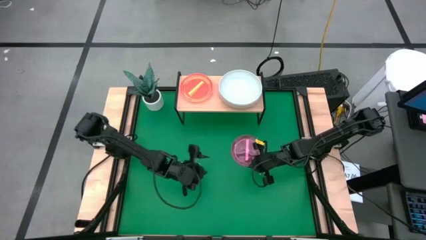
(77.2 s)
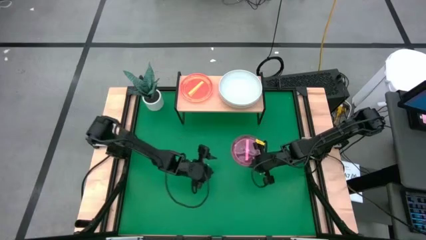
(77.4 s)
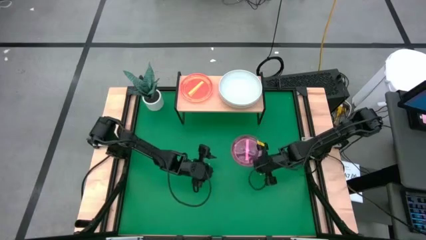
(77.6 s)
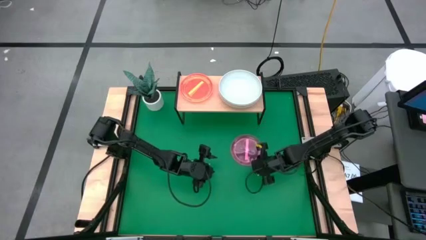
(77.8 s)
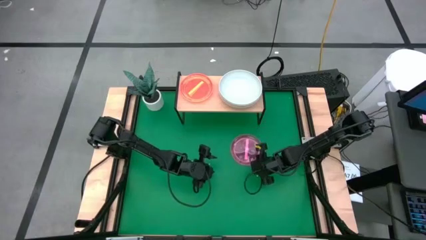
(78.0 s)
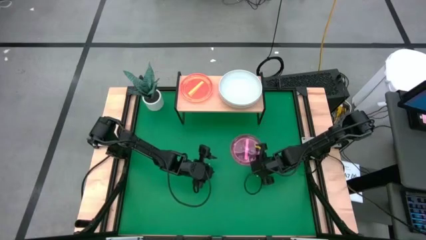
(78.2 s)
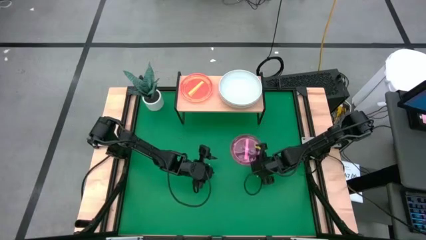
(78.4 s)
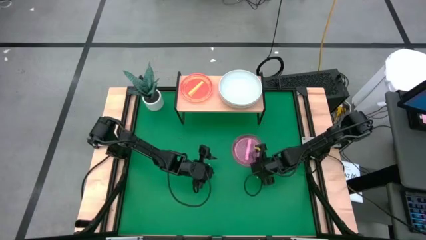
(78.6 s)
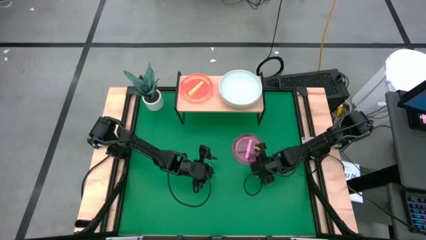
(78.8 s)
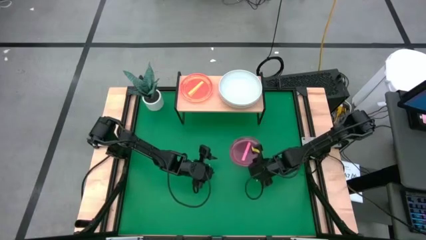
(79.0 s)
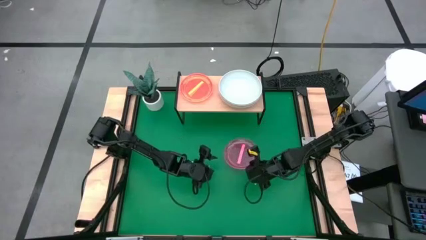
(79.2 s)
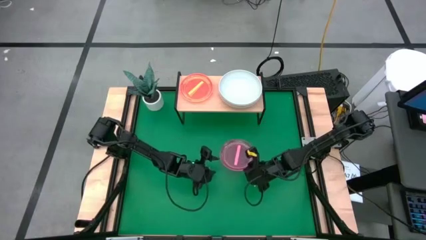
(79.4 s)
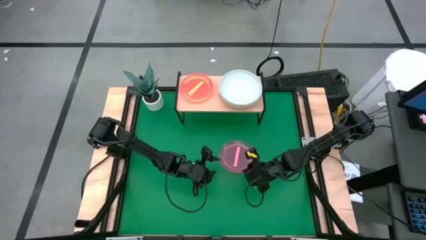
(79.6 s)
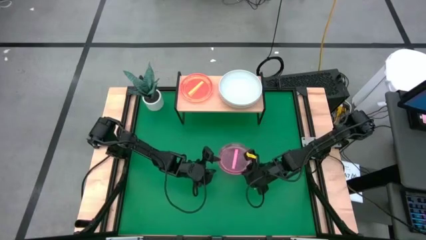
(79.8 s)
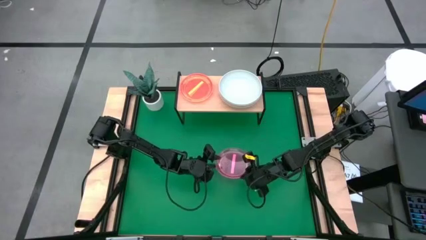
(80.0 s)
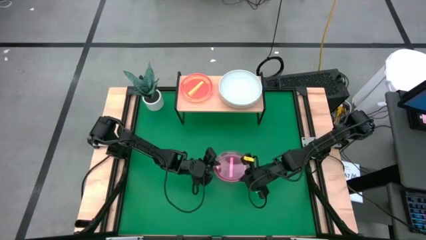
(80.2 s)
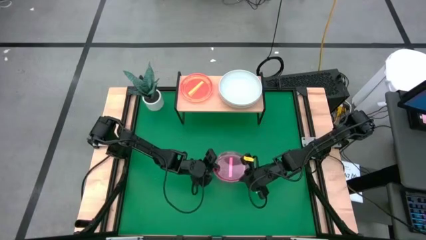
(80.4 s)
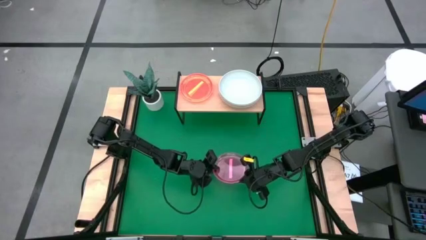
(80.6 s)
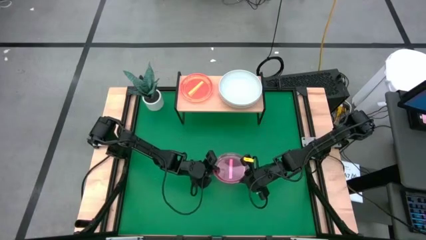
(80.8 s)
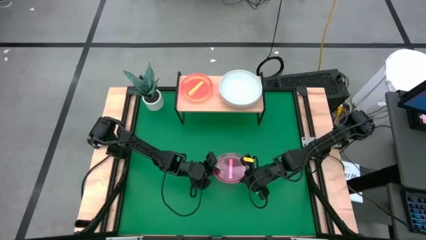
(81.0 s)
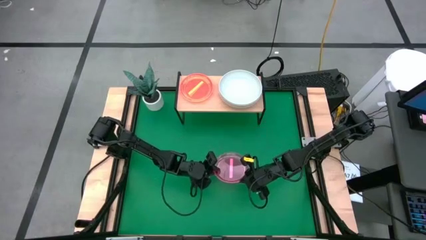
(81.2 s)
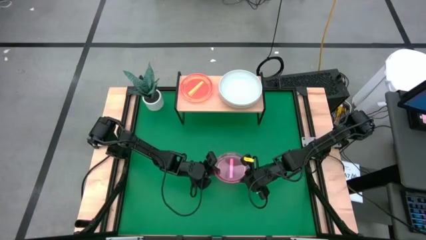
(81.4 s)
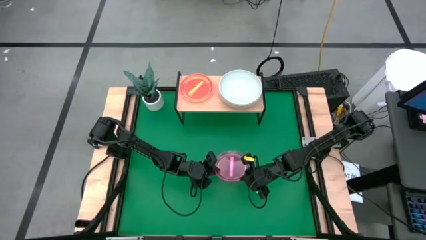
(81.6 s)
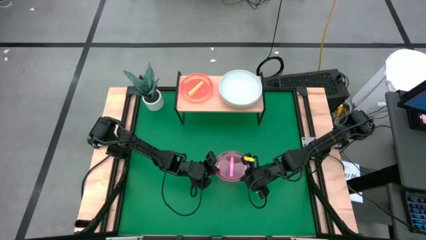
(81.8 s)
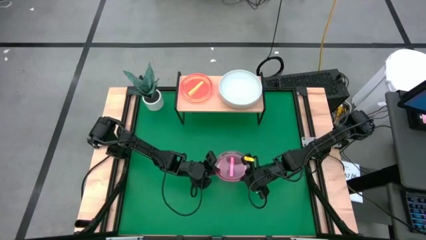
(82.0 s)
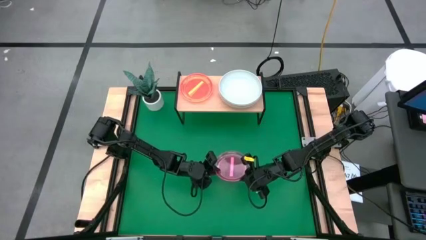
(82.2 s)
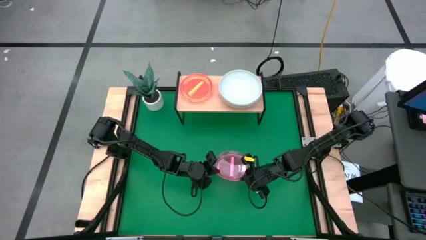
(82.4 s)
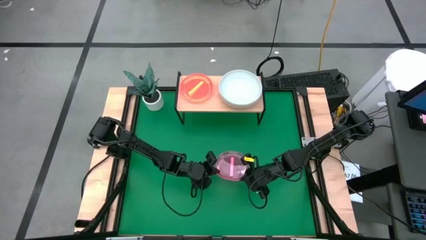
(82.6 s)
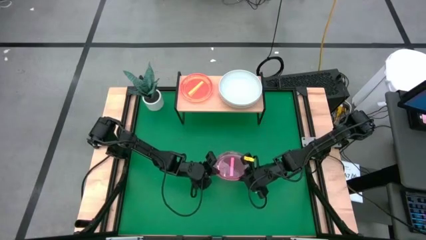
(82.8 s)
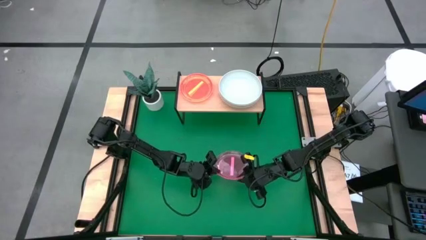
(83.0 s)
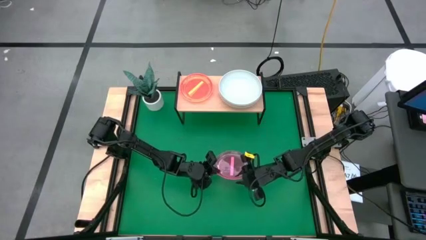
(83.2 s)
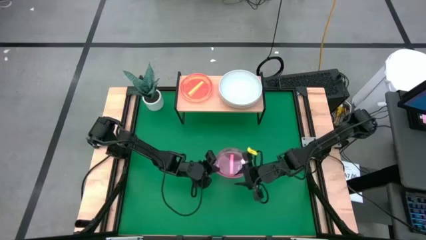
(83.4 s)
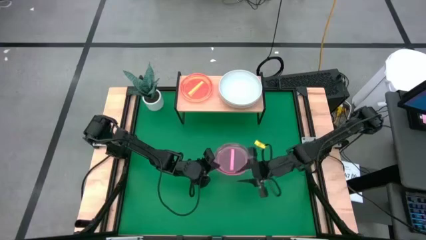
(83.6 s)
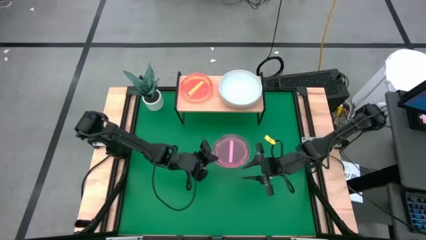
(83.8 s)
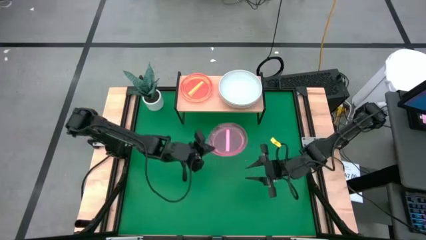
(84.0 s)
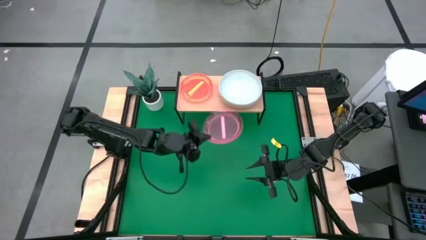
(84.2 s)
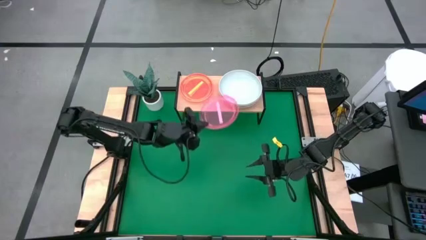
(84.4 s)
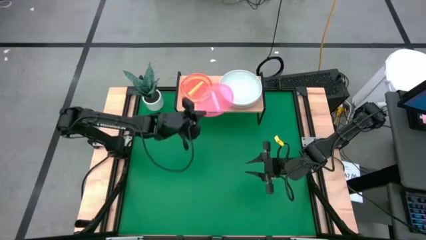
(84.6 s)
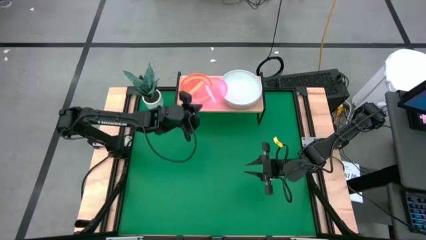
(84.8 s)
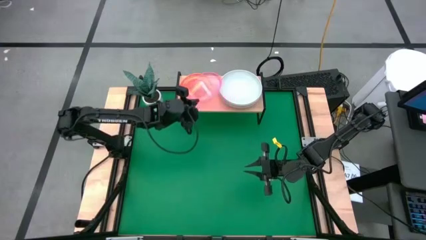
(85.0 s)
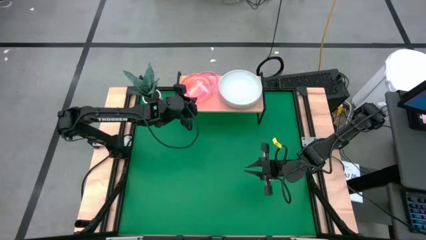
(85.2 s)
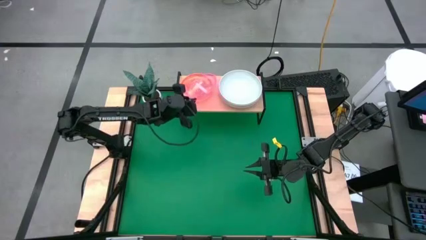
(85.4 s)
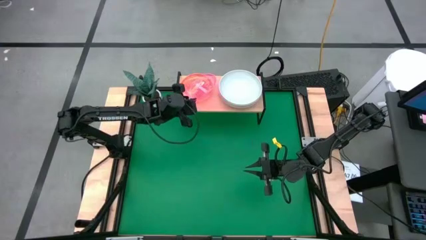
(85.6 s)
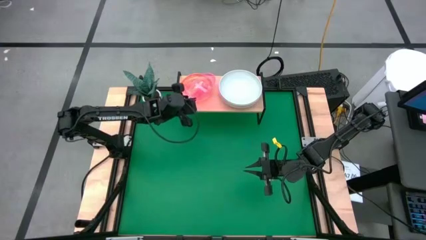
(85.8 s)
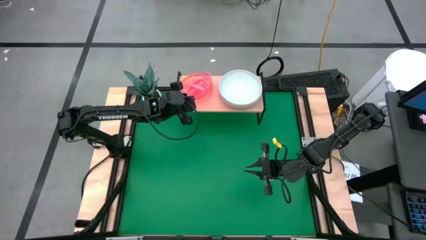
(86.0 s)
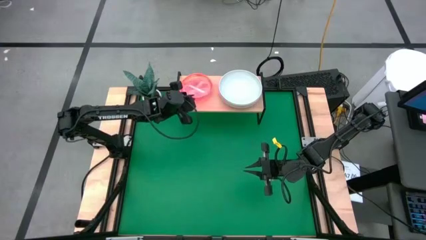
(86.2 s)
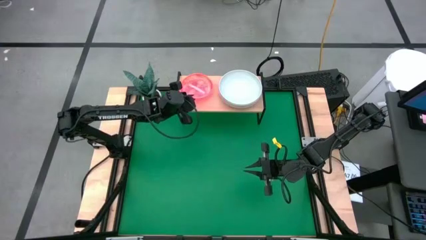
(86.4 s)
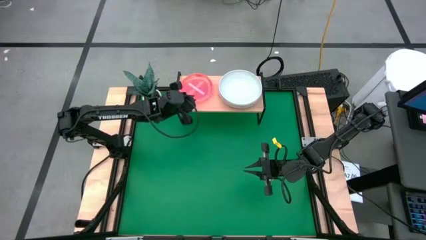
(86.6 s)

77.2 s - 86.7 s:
Task: Place and stack plates onto a shelf
Stack the transparent pink plate on the transparent orange plate on the shelf

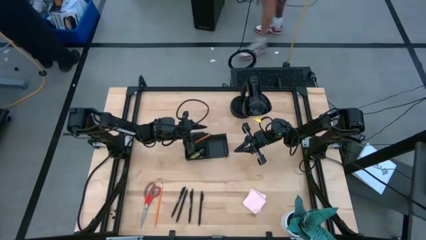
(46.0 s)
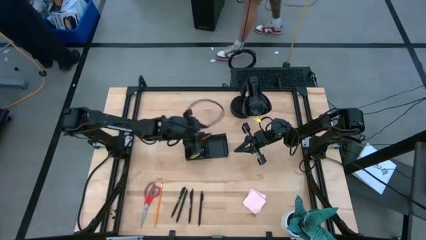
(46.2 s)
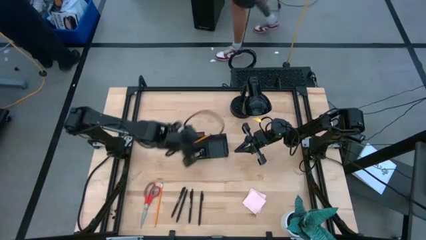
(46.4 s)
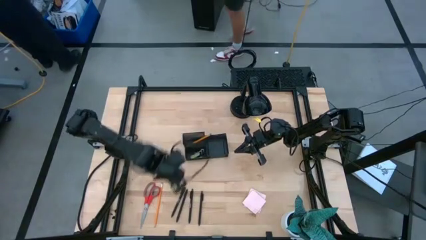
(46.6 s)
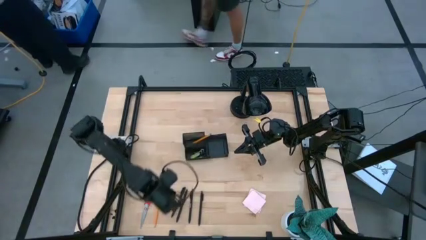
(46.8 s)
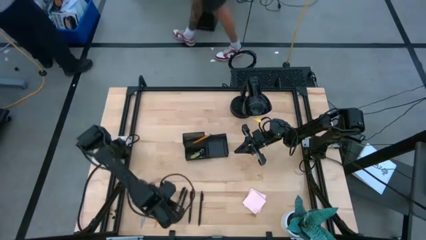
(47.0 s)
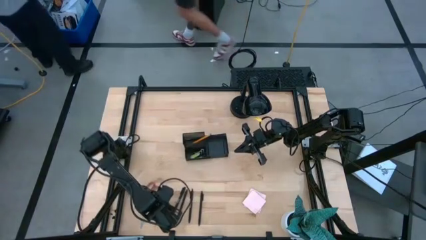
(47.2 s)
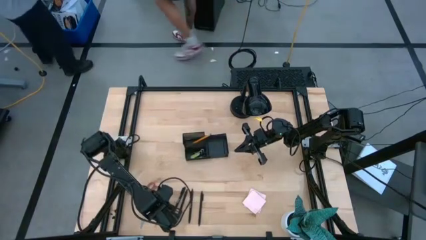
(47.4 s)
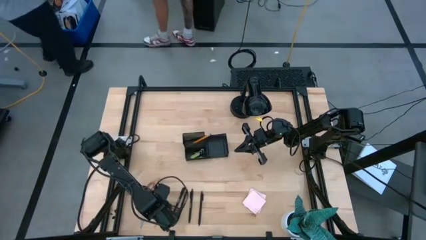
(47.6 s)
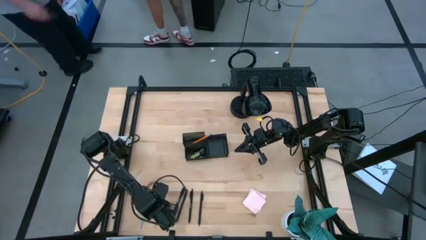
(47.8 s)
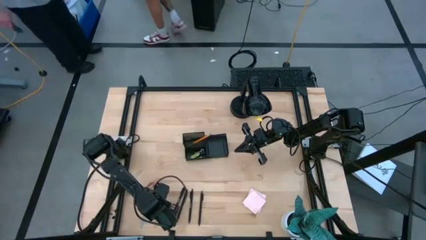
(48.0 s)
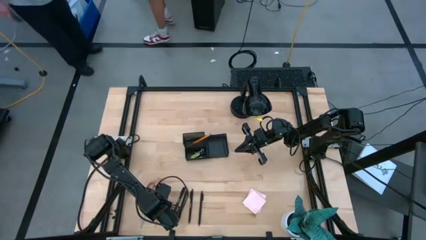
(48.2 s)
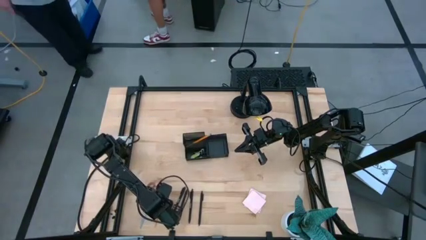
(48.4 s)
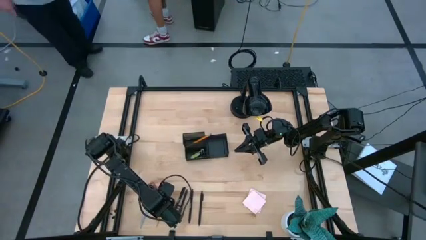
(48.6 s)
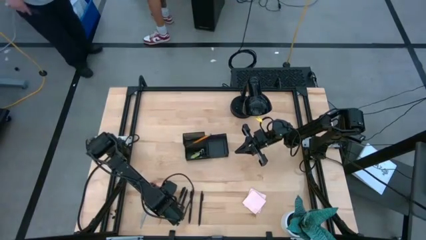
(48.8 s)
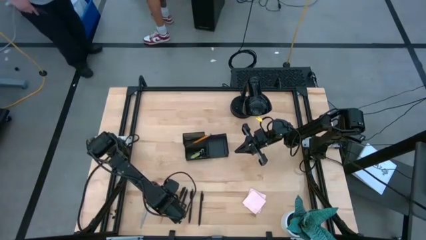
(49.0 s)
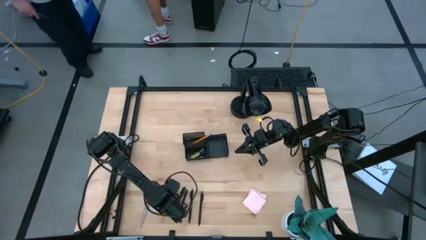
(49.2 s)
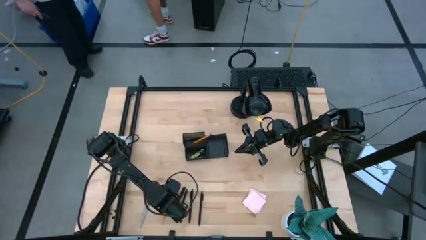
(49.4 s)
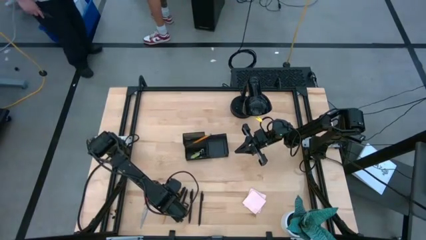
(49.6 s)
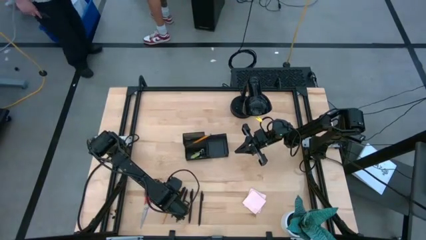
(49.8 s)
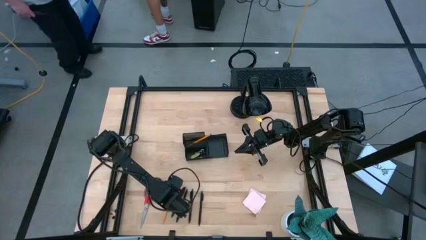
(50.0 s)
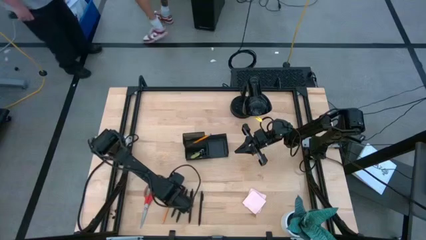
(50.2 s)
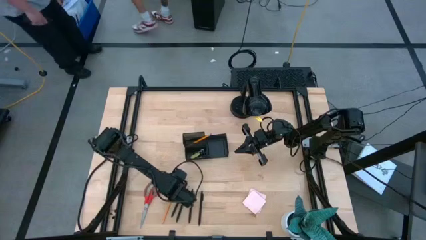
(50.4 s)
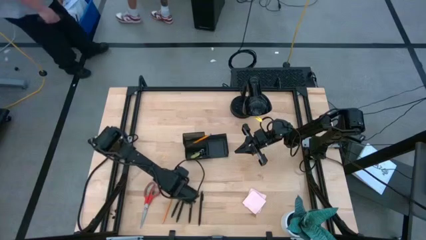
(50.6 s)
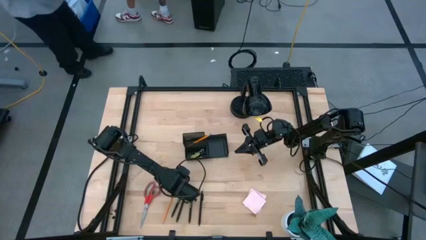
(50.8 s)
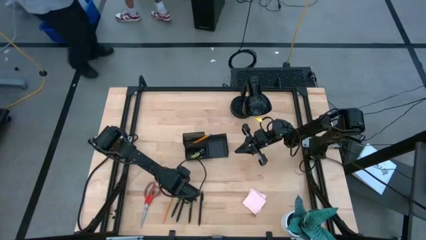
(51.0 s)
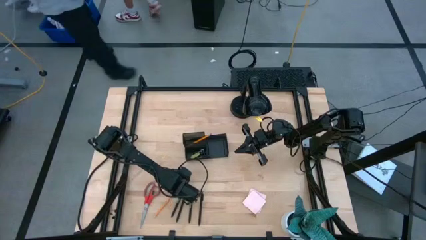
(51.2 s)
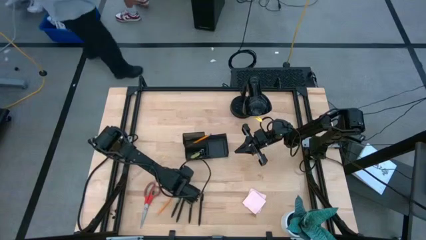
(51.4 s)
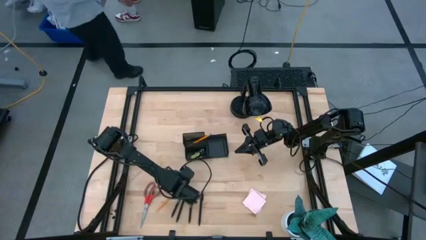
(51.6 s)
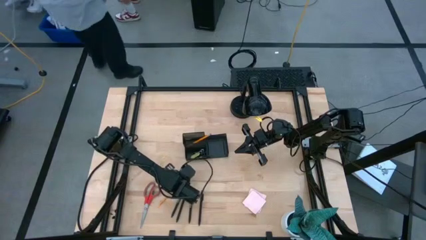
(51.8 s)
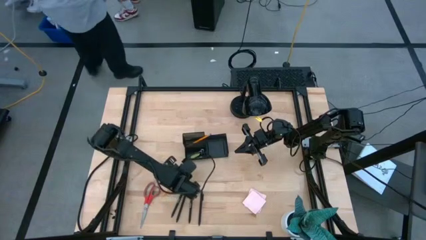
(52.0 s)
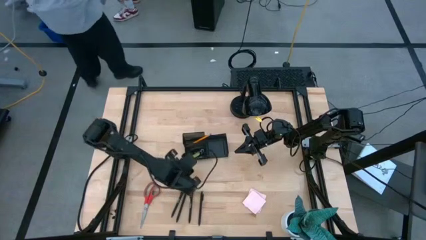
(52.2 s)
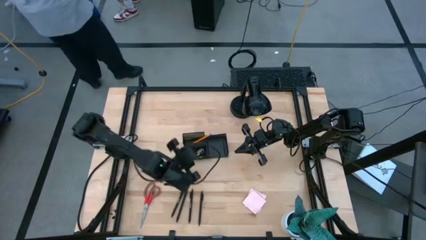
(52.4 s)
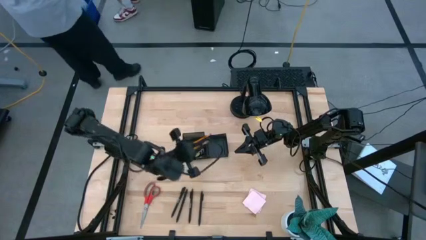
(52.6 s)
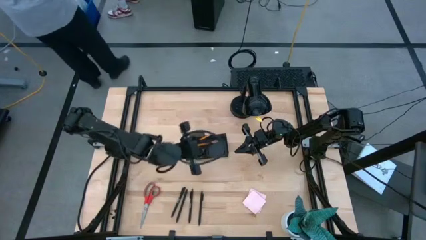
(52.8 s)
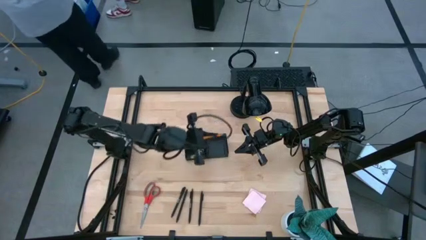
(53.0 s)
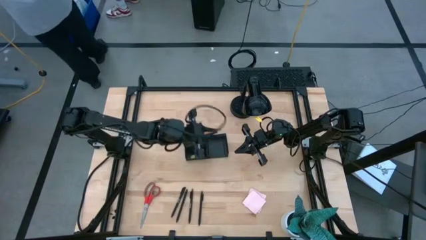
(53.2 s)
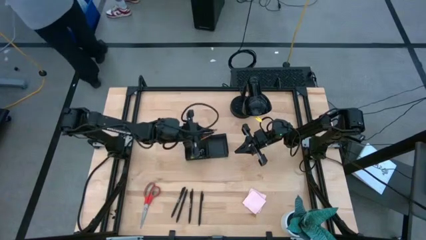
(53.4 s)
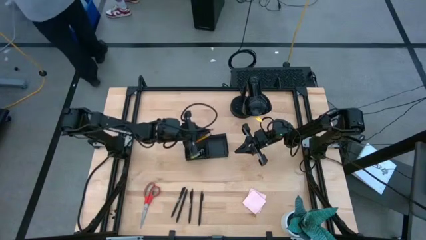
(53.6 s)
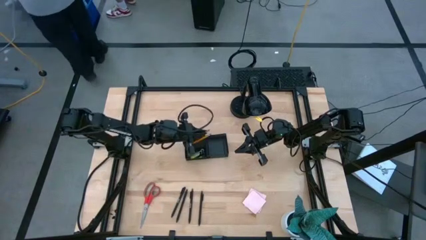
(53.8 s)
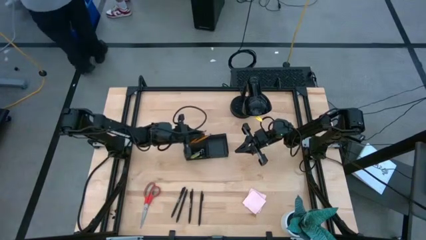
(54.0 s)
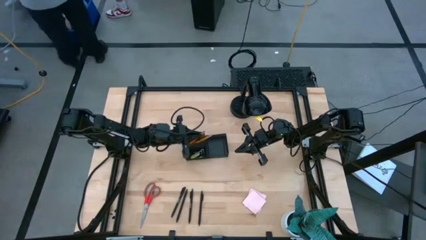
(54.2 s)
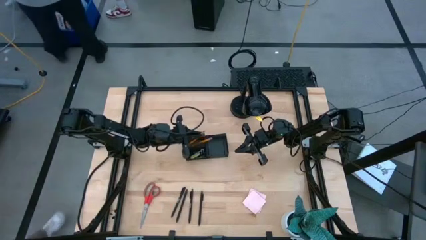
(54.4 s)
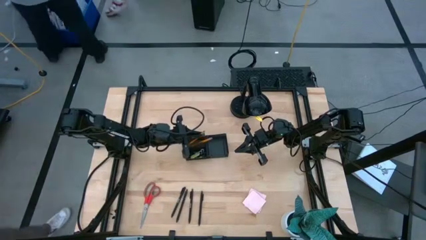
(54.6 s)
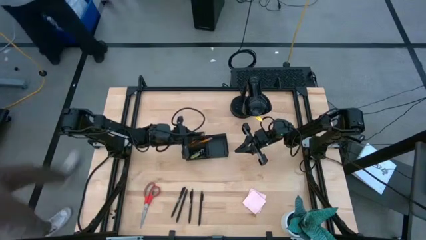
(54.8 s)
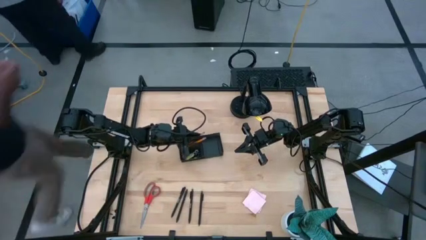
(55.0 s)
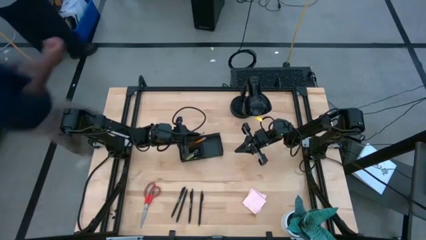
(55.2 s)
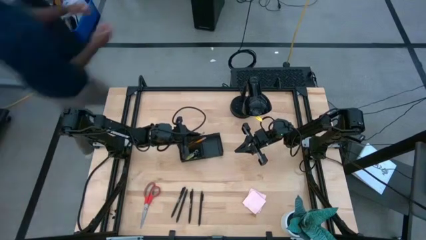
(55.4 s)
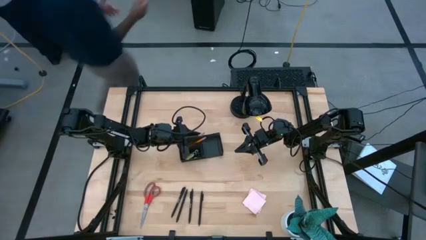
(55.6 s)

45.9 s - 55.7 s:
Task: Pick and place office supplies into organizer
Put the orange pencil into the black desk organizer
